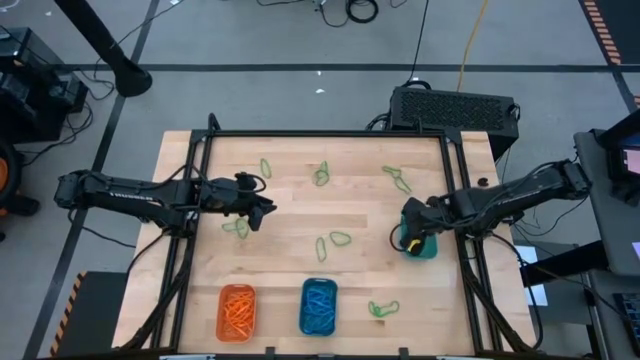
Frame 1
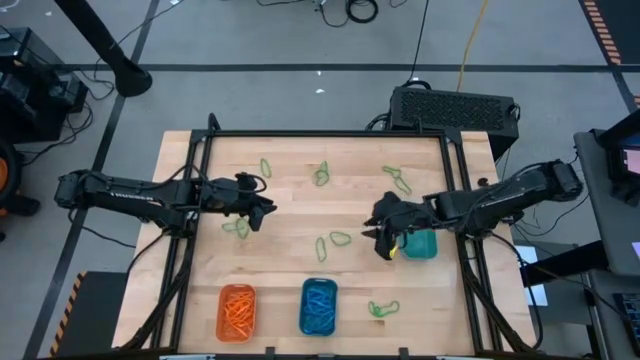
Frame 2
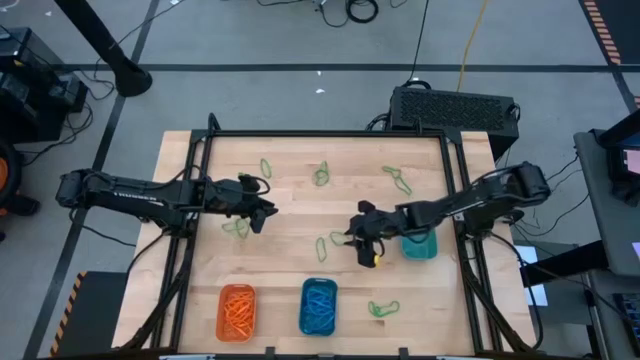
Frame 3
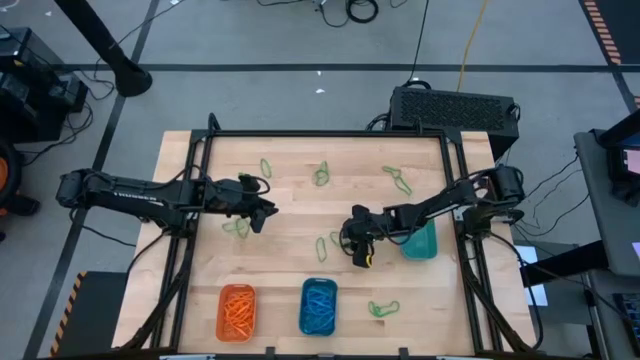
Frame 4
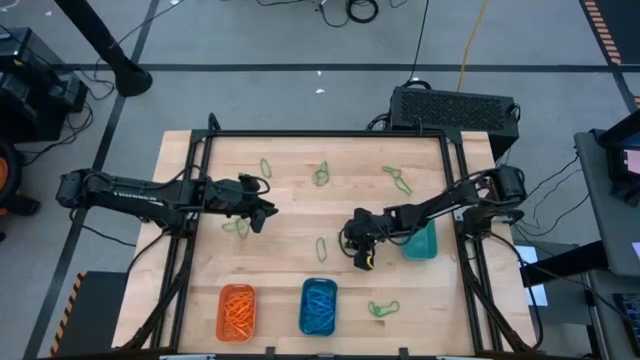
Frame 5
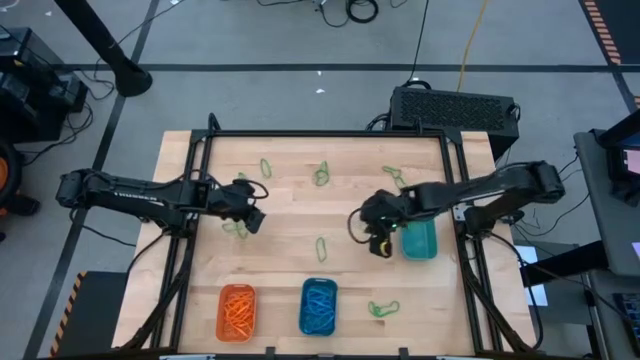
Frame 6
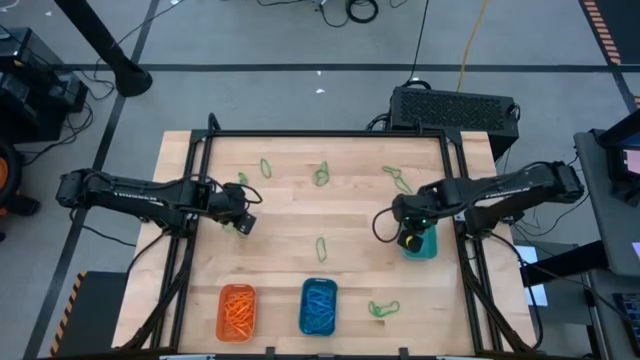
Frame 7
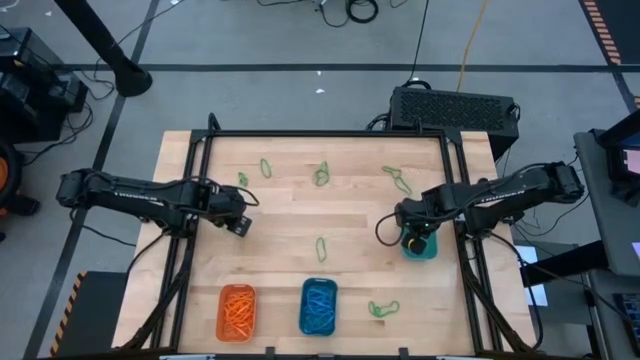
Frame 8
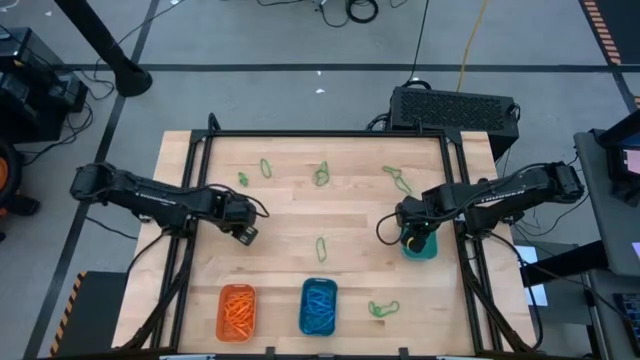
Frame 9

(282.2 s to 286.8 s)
Task: Sort rubber bands into baskets
Put the green rubber band into the green bin

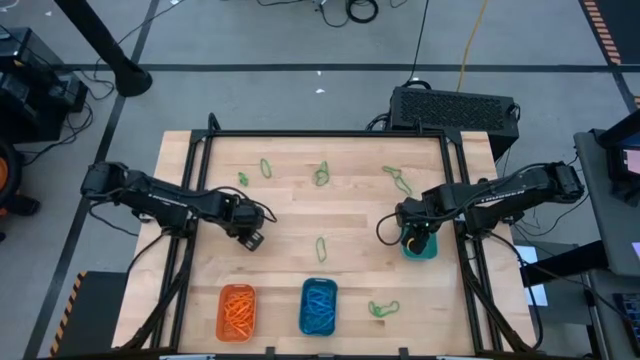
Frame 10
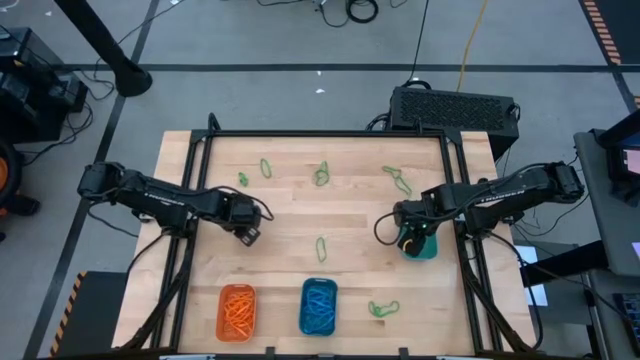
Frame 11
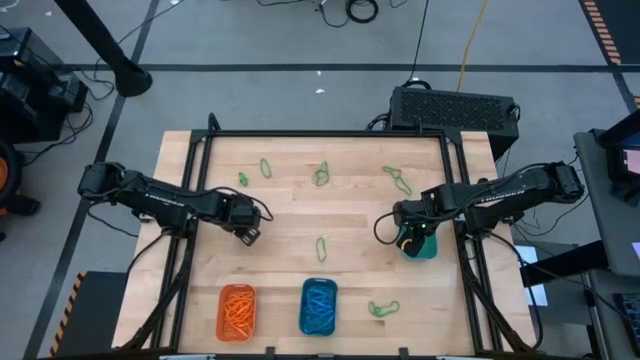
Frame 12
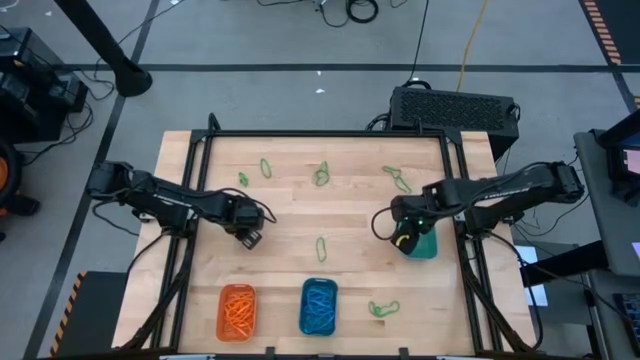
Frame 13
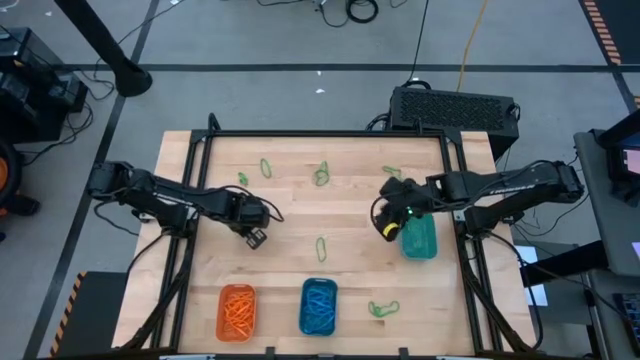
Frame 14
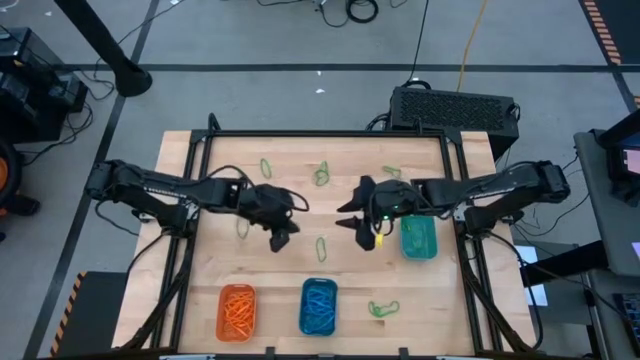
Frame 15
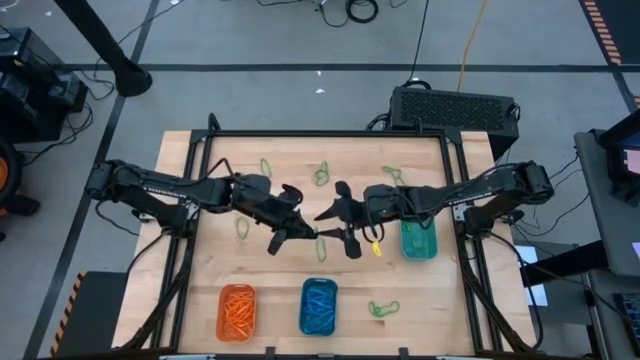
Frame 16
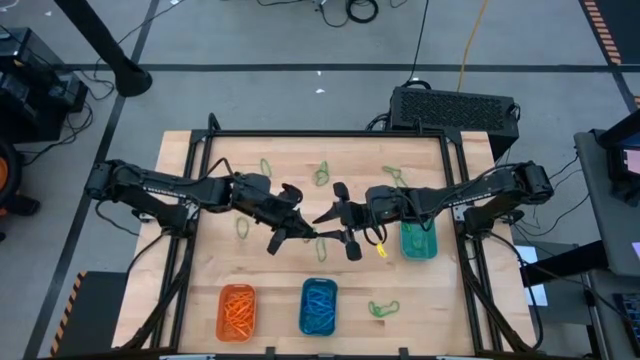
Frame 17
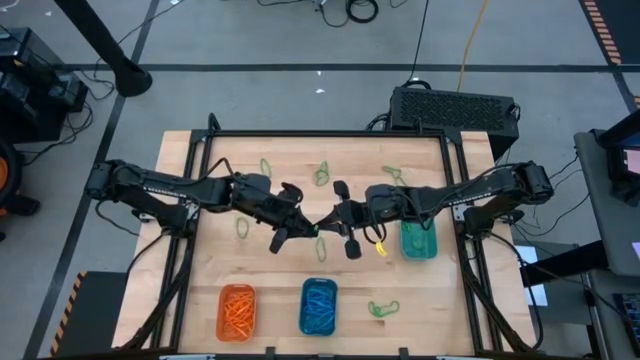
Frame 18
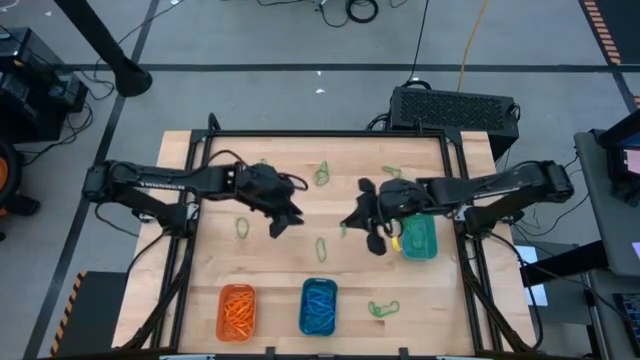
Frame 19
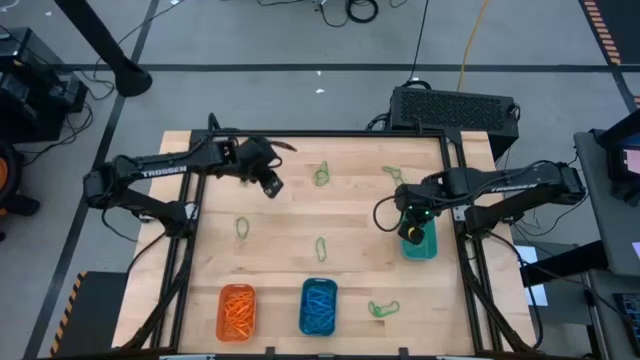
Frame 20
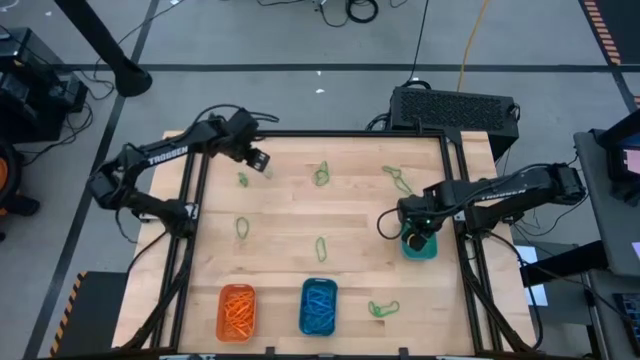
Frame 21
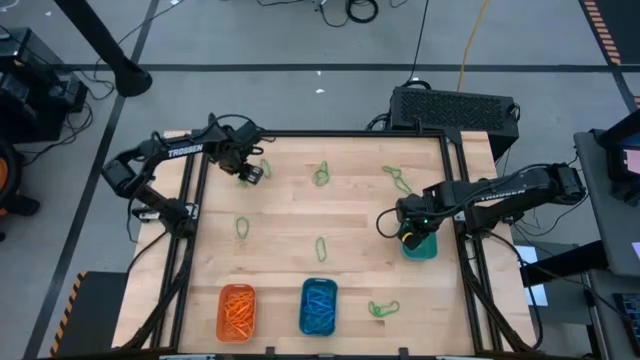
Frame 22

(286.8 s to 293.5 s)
Put the green rubber band into the green bin

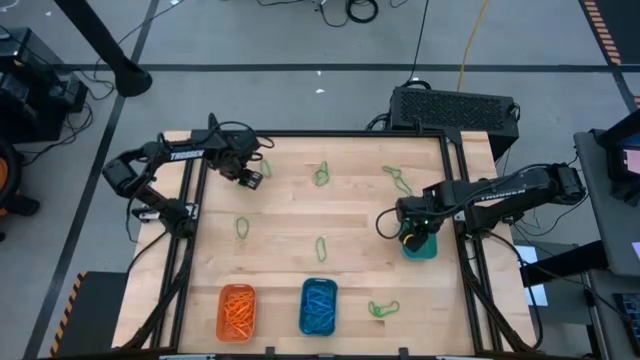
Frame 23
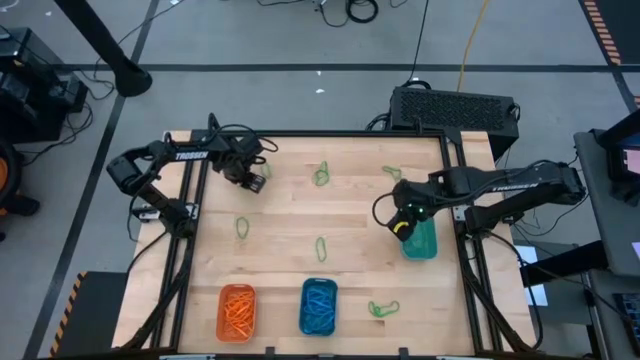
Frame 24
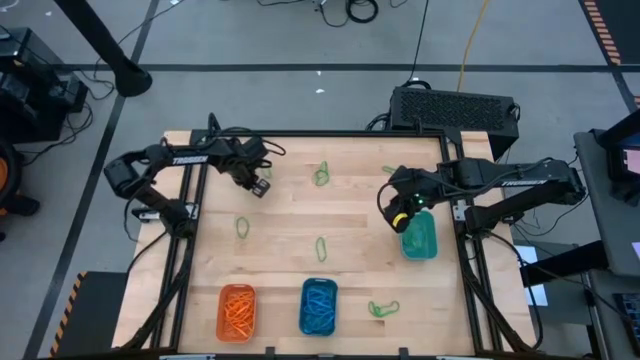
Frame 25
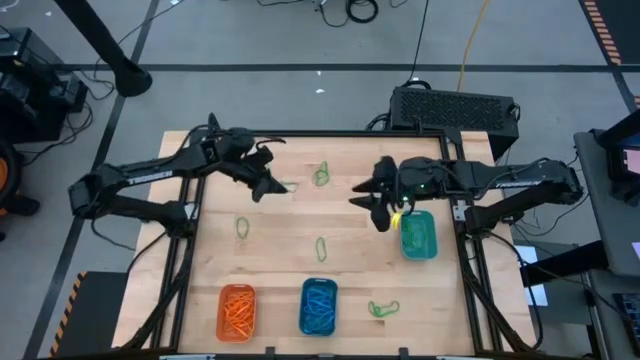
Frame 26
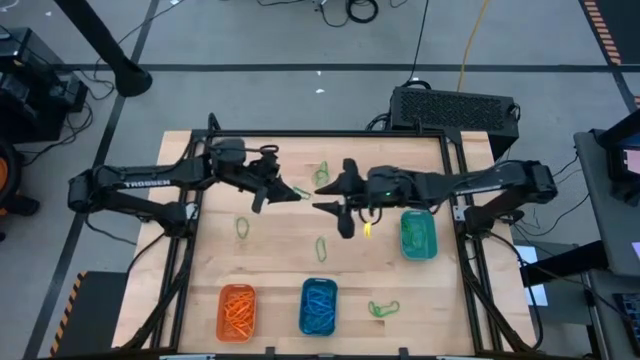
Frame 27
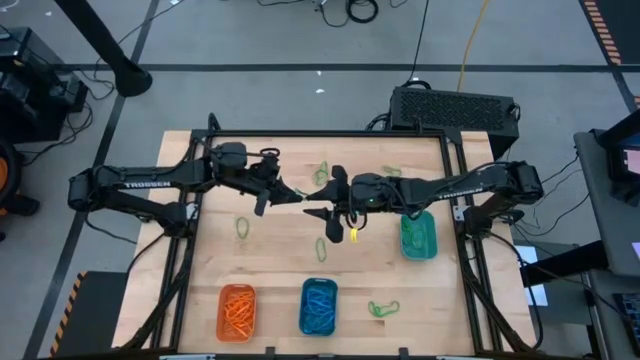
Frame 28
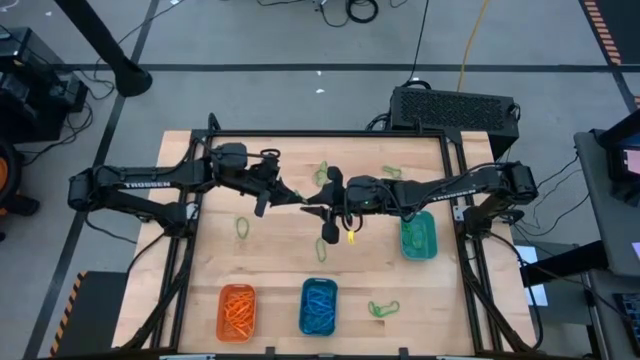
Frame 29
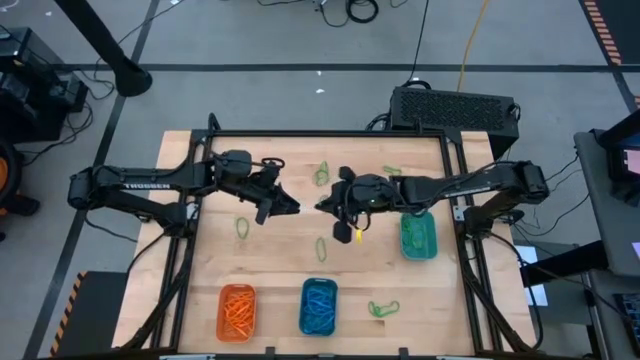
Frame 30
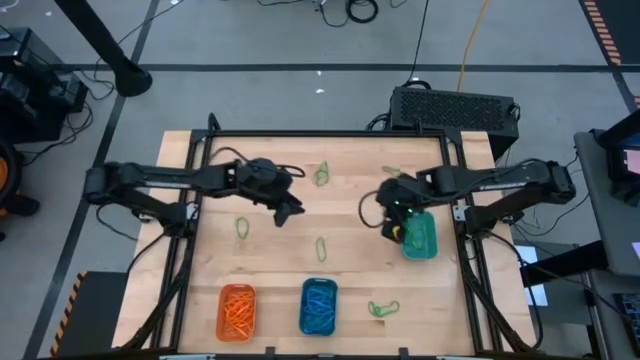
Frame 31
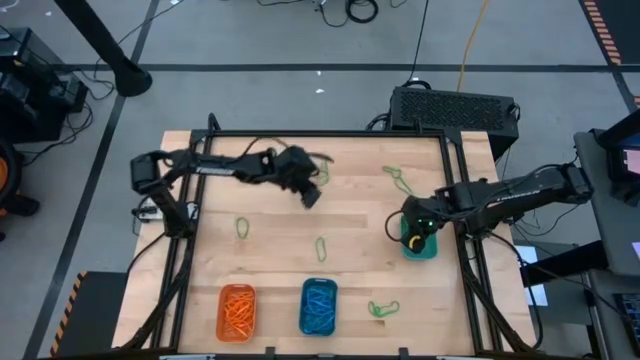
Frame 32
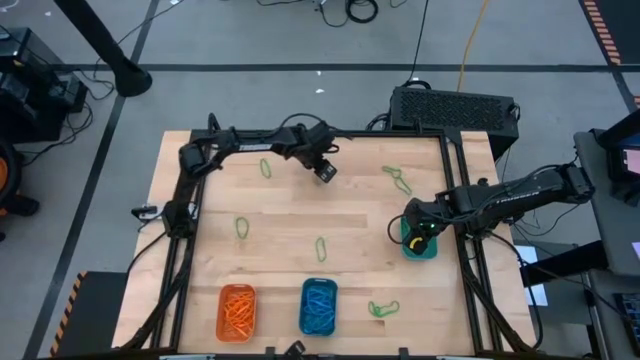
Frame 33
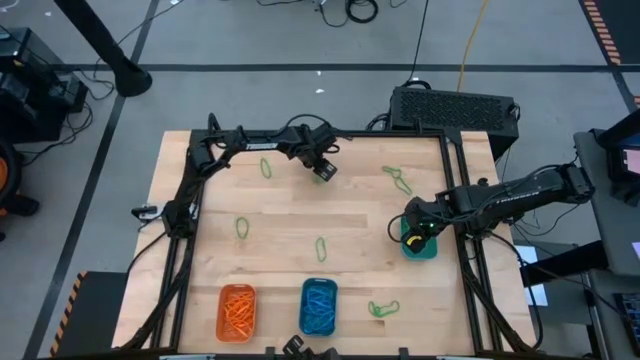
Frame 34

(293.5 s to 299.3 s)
Put the green rubber band into the green bin

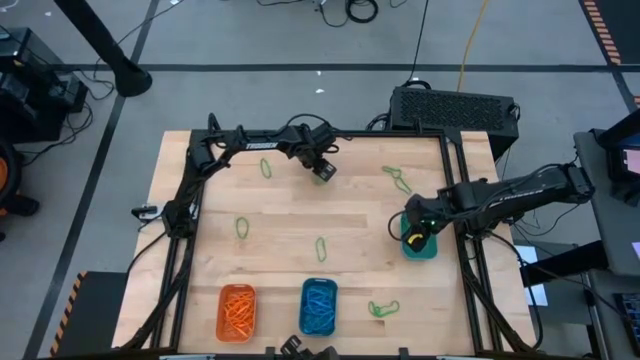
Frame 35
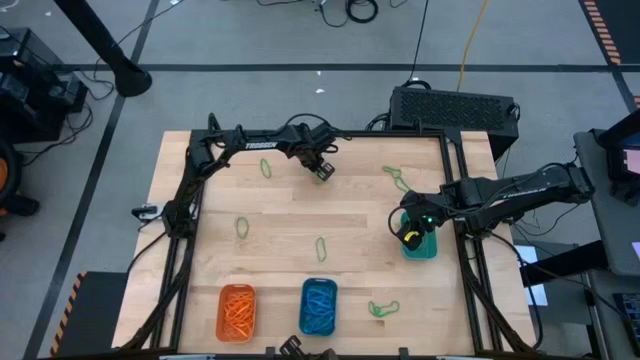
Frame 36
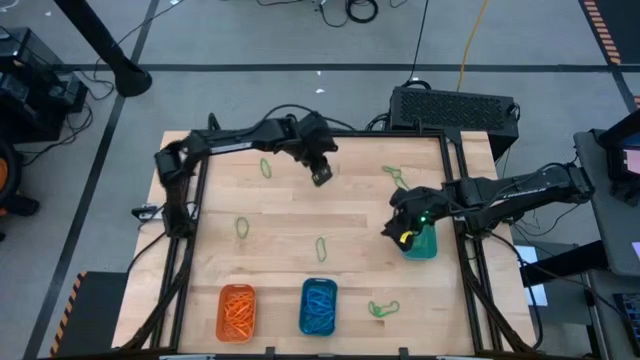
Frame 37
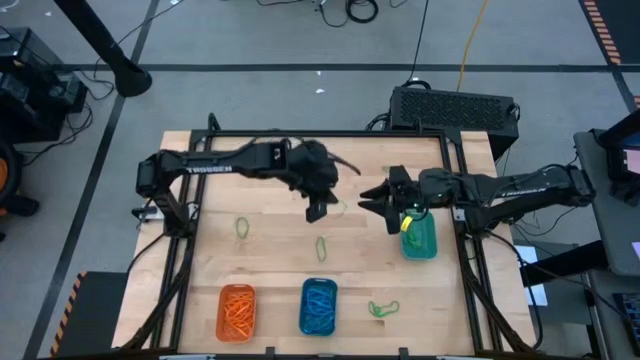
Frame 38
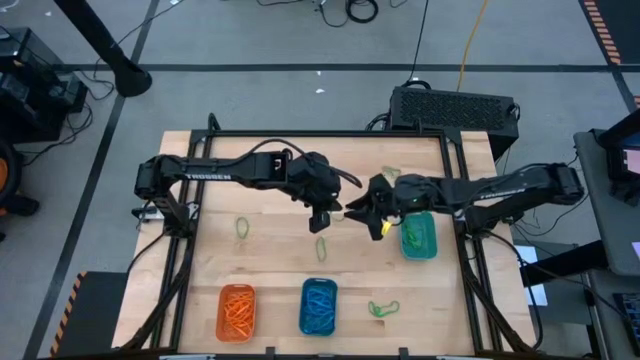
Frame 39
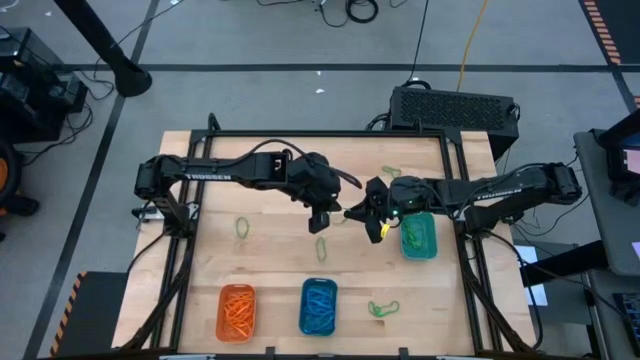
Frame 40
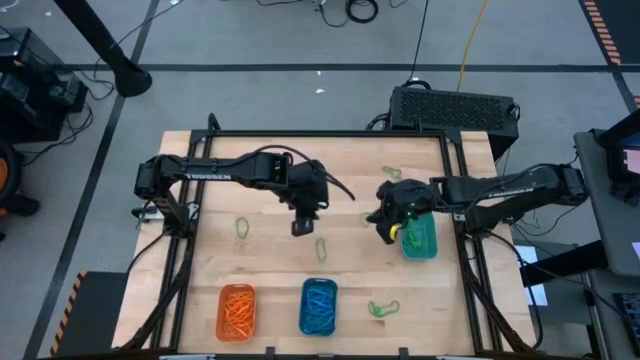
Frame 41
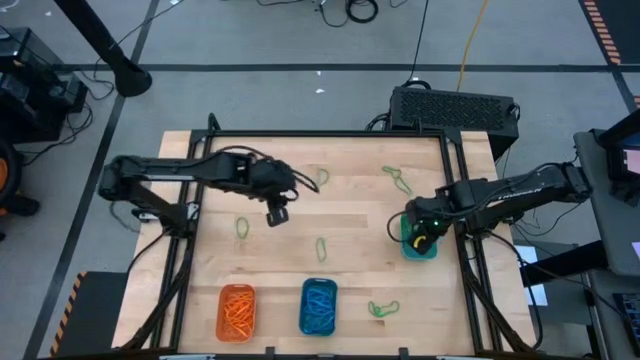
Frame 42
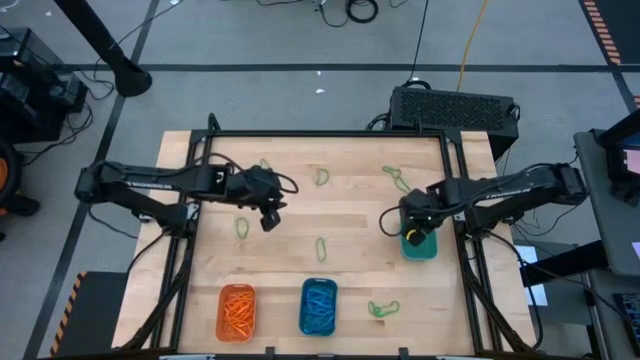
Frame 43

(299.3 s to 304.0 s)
Put the green rubber band into the green bin
